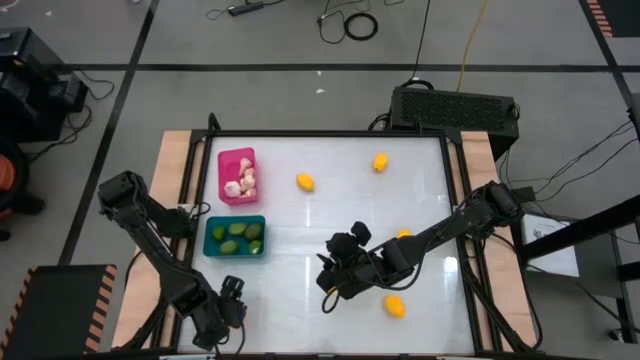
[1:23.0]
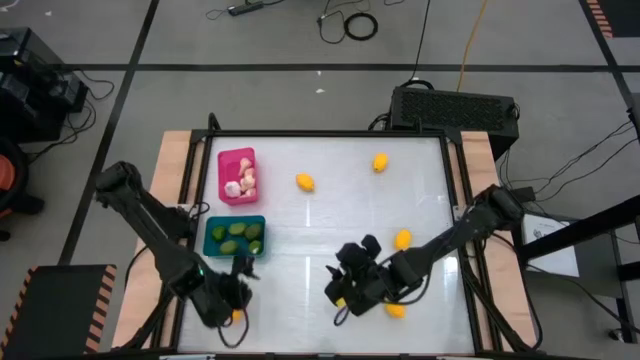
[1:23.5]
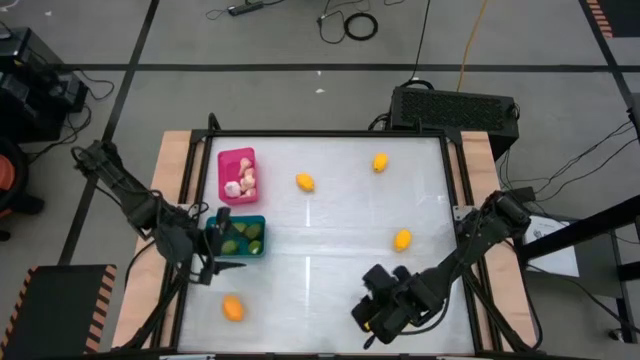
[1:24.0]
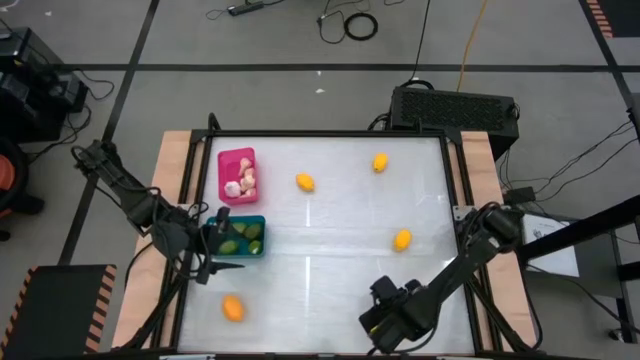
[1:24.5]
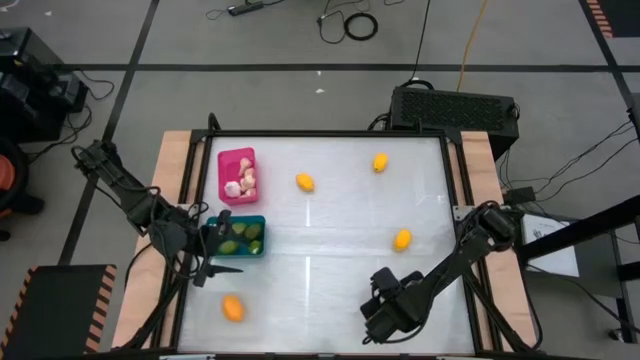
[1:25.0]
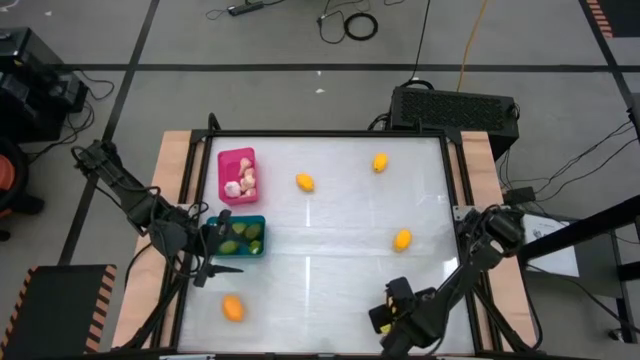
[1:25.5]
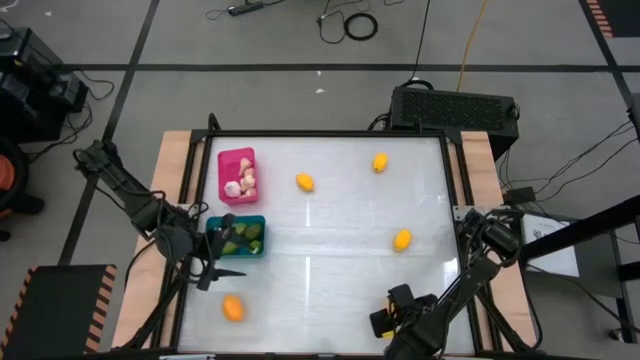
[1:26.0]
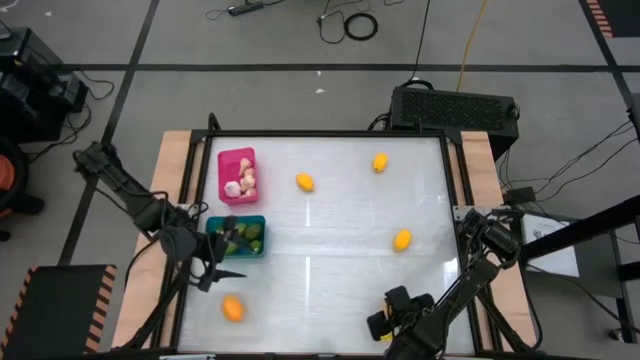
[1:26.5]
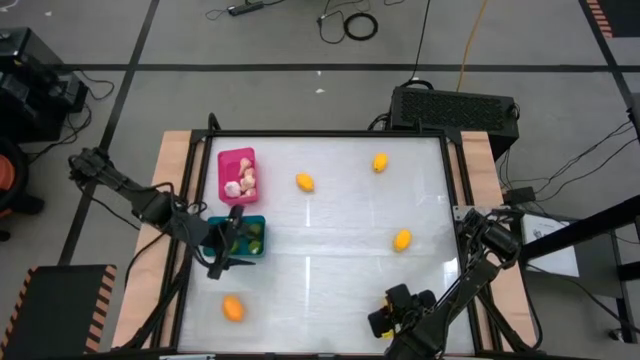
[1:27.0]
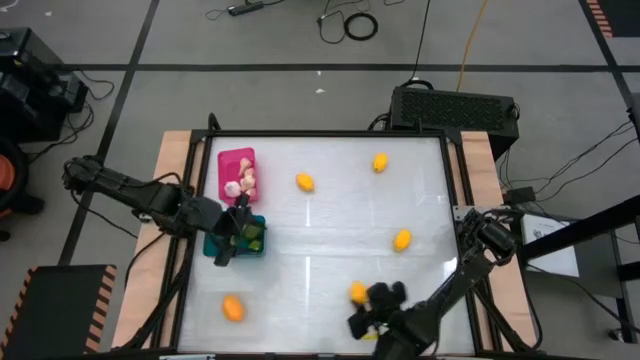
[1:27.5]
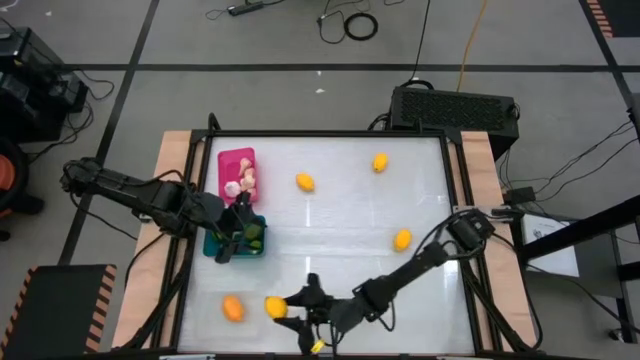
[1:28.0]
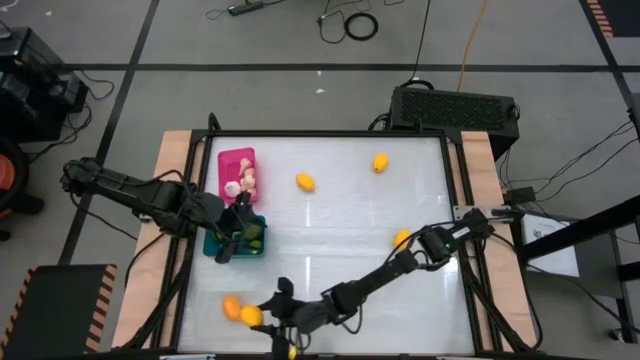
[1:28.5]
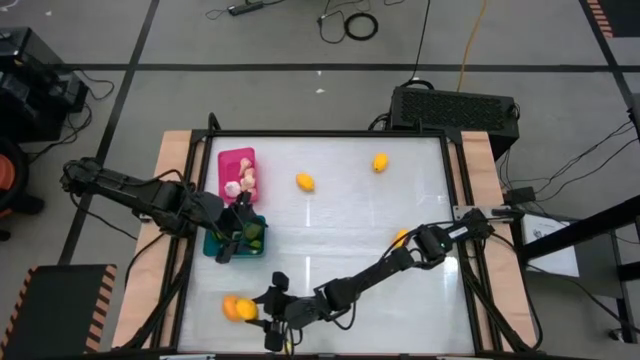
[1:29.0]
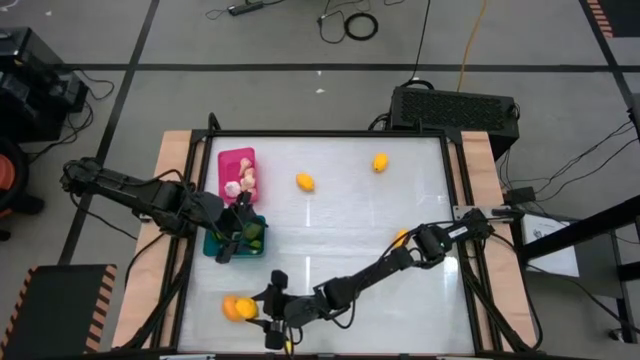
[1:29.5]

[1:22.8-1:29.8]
Task: Sort produce into baskets
Put the yellow lime into the transparent bin

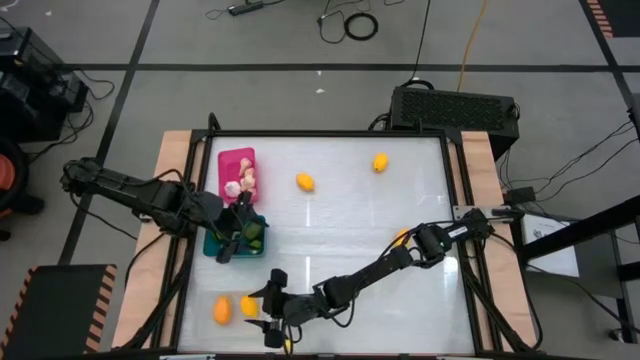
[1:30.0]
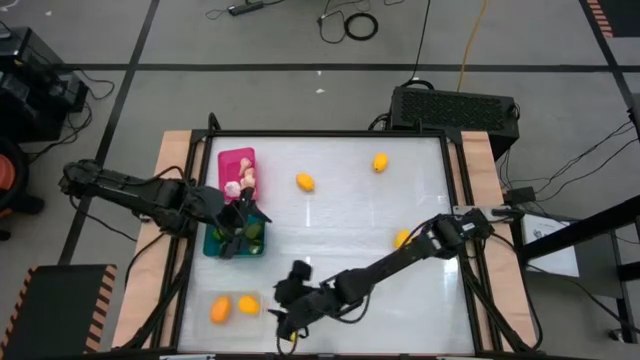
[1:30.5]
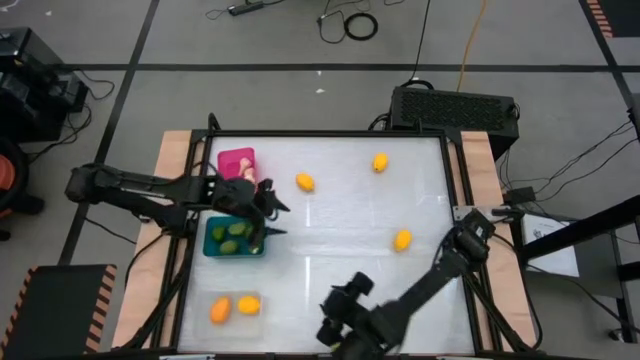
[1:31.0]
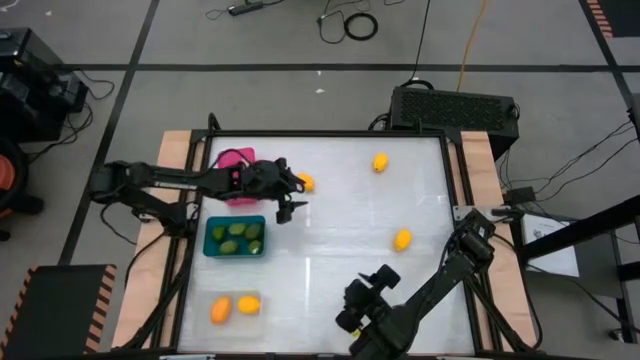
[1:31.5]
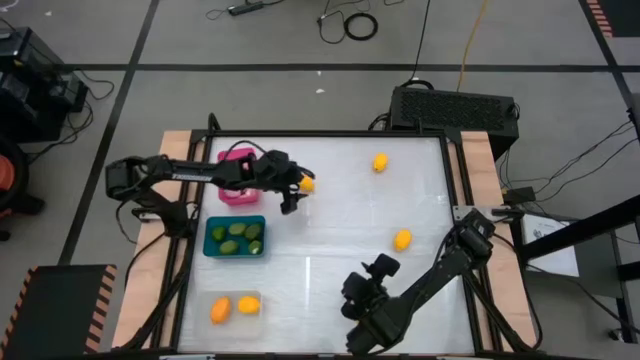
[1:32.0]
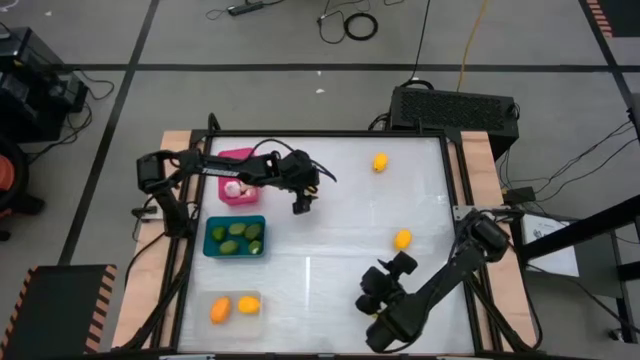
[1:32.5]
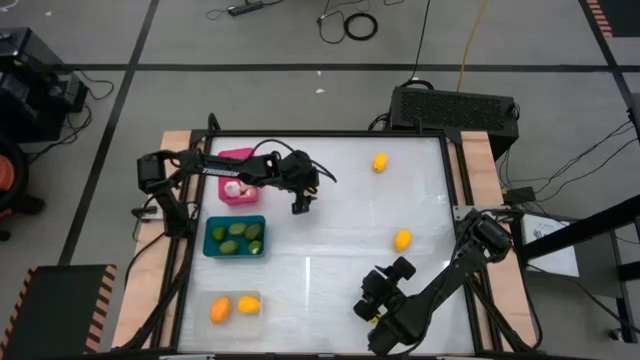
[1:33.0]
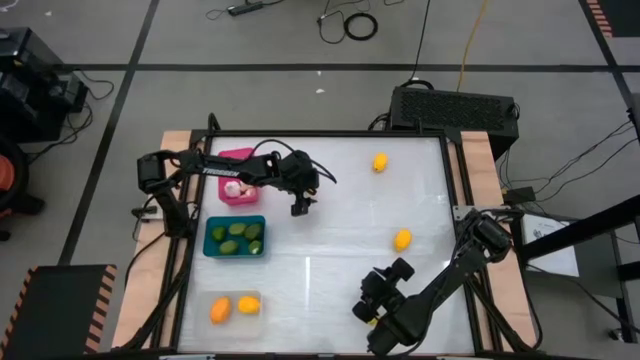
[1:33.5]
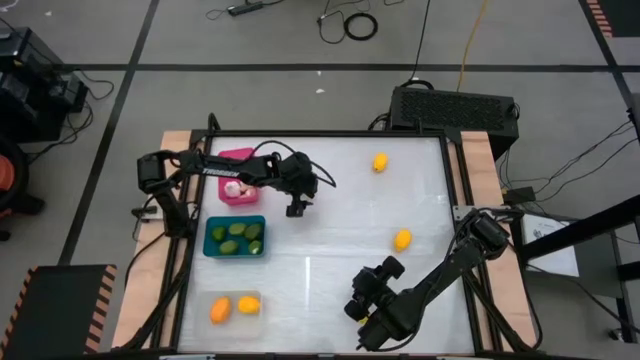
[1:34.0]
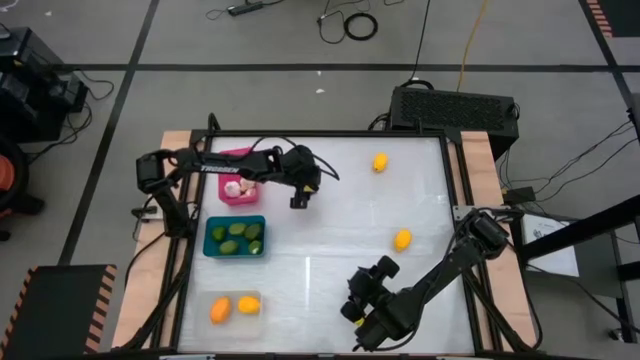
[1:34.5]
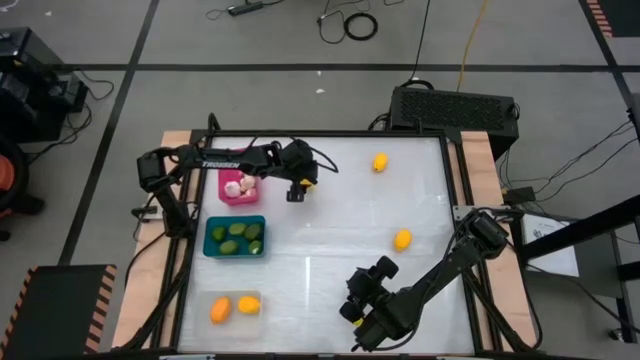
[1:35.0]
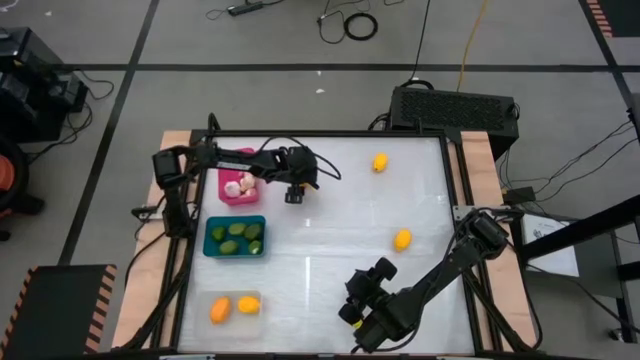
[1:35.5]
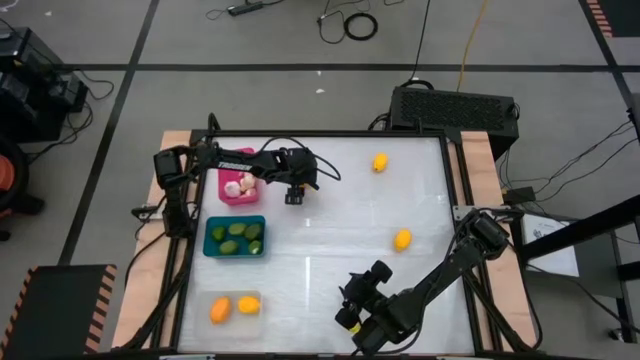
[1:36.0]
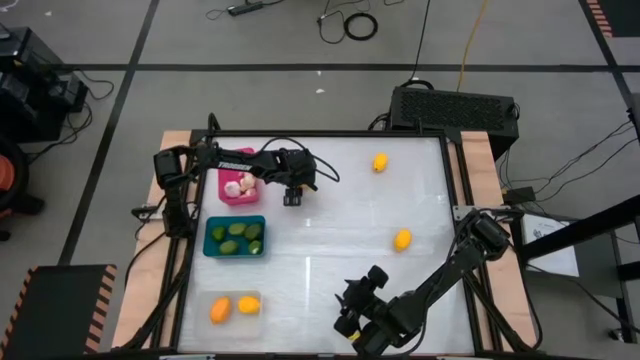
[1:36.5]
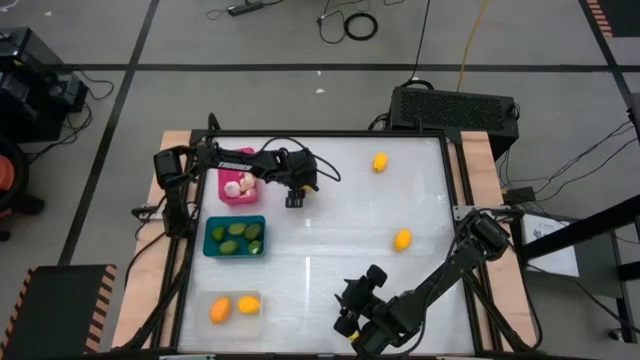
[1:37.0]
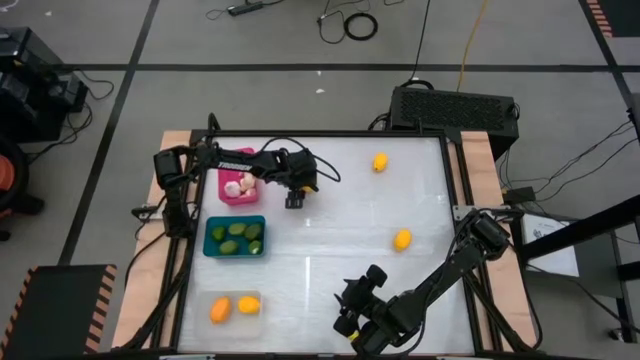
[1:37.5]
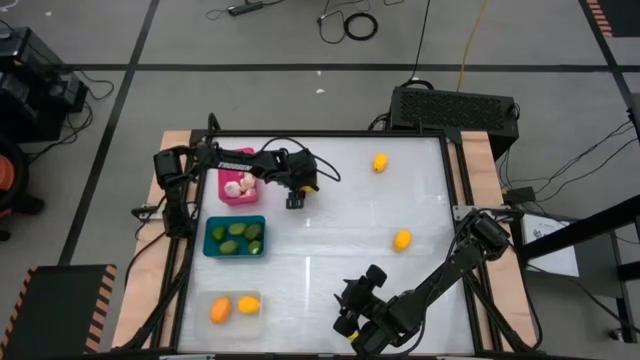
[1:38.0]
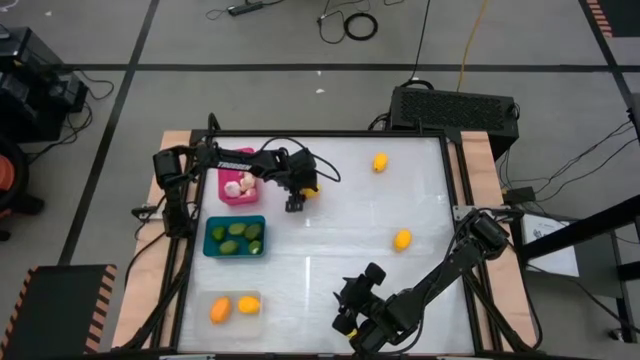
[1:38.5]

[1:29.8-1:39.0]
Put the yellow lime into the transparent bin

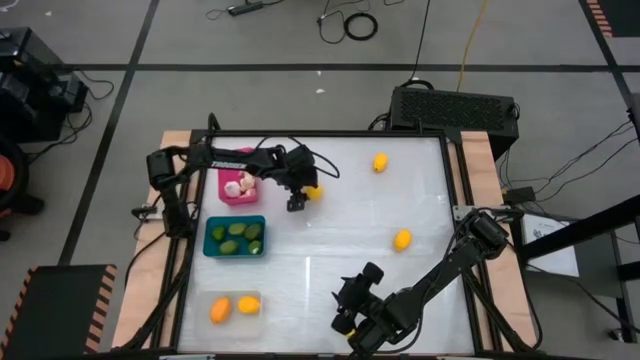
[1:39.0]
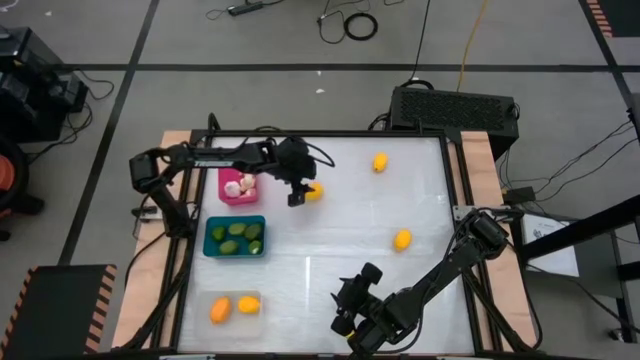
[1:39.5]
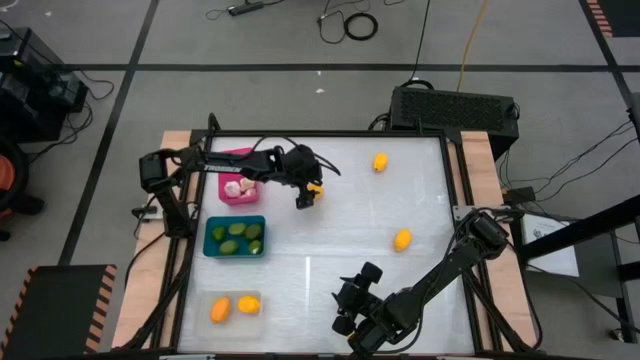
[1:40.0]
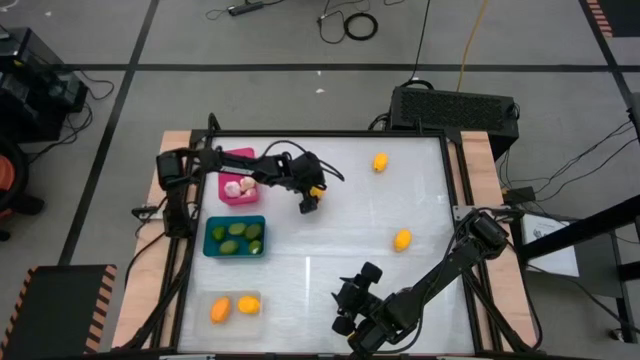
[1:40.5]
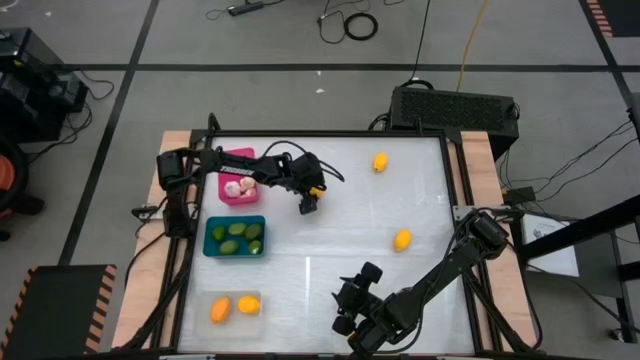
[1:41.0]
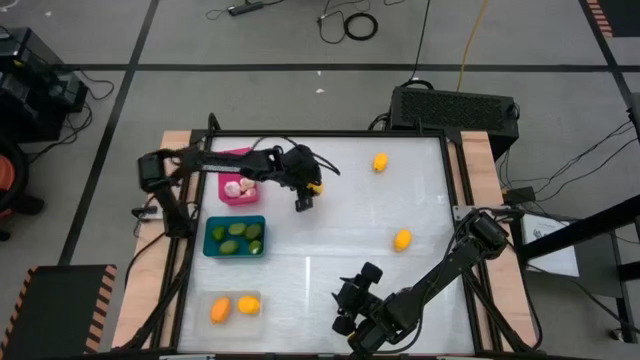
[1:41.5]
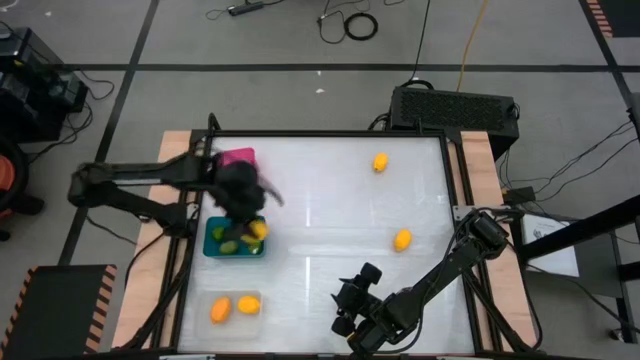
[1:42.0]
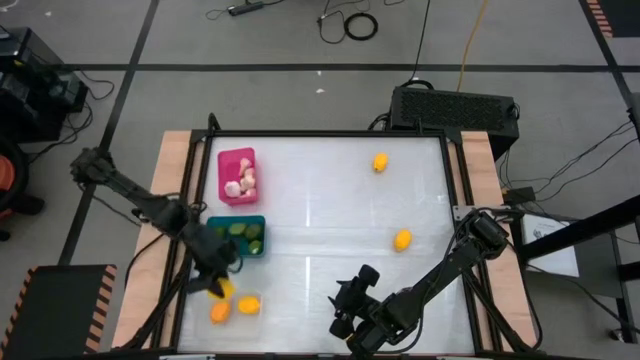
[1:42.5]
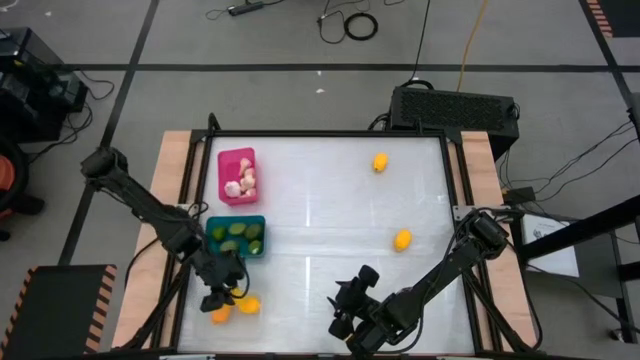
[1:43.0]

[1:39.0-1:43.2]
Put the yellow lime into the transparent bin
